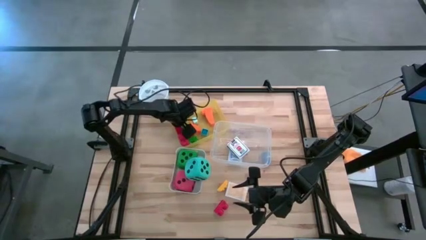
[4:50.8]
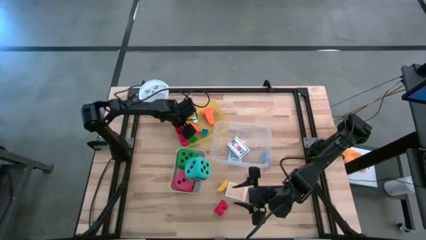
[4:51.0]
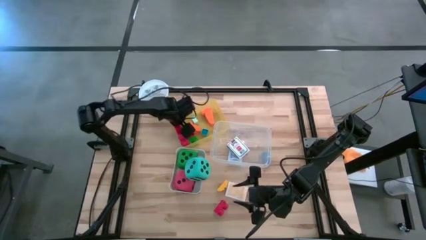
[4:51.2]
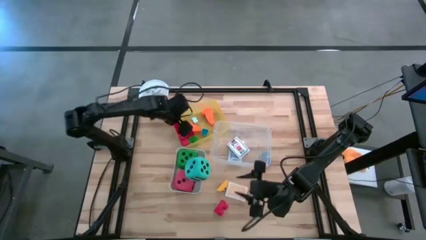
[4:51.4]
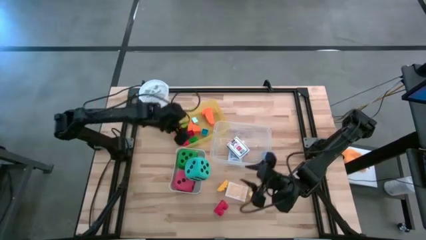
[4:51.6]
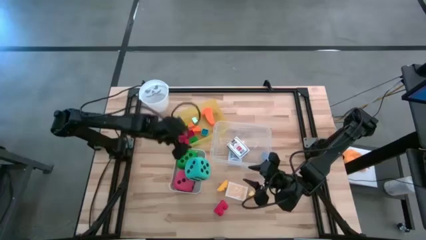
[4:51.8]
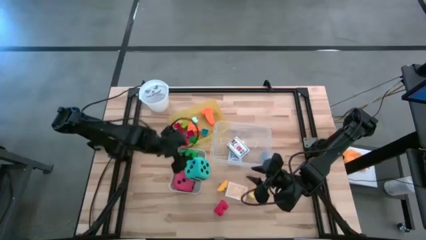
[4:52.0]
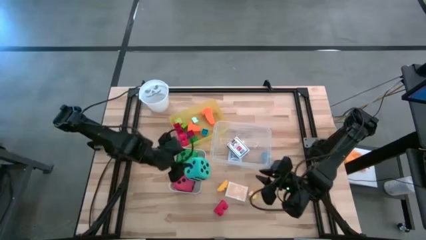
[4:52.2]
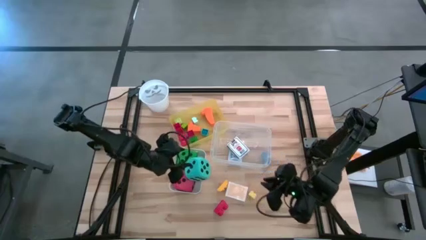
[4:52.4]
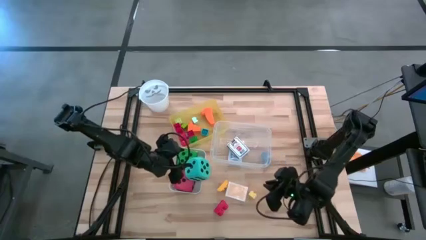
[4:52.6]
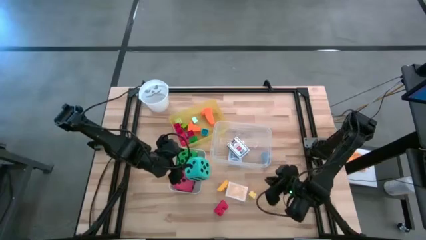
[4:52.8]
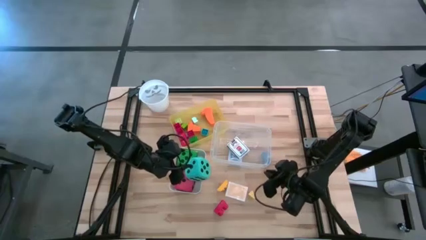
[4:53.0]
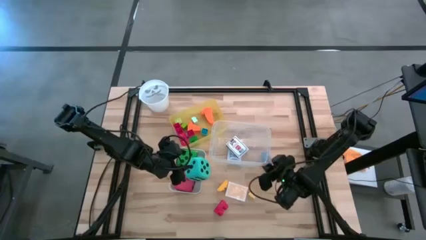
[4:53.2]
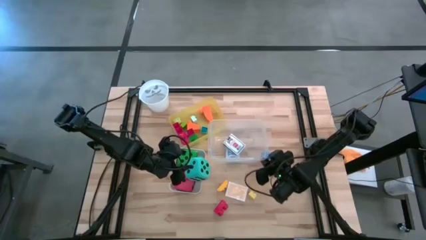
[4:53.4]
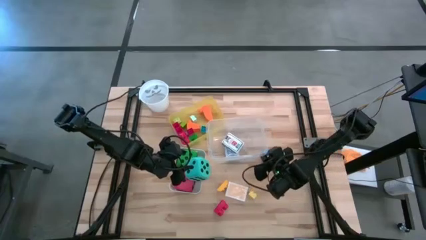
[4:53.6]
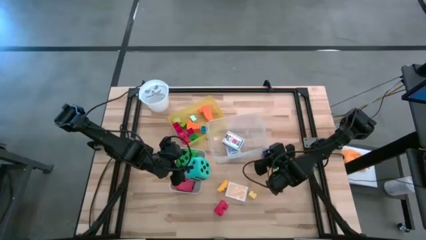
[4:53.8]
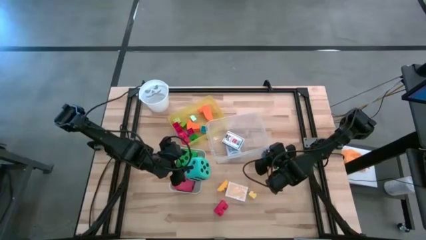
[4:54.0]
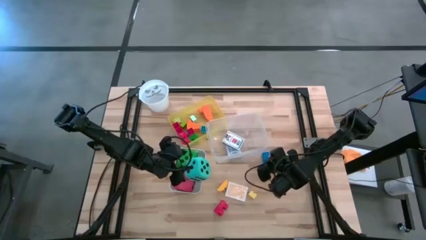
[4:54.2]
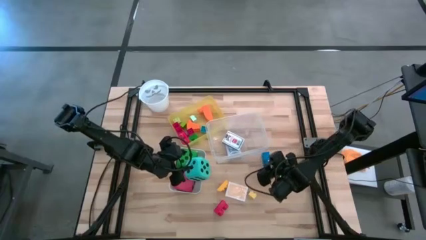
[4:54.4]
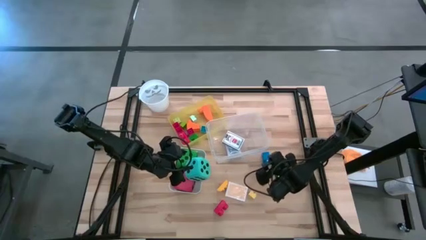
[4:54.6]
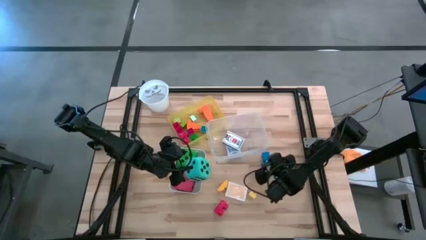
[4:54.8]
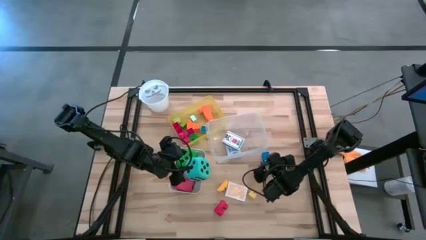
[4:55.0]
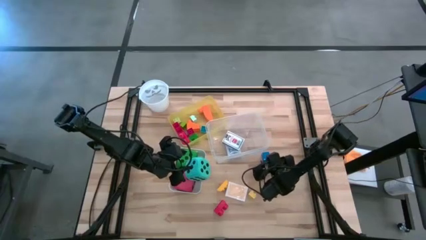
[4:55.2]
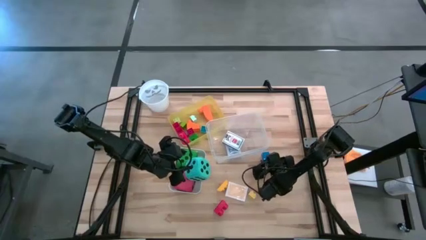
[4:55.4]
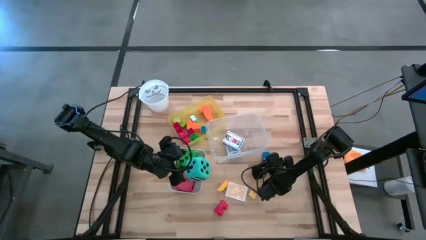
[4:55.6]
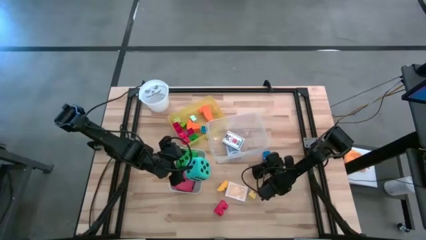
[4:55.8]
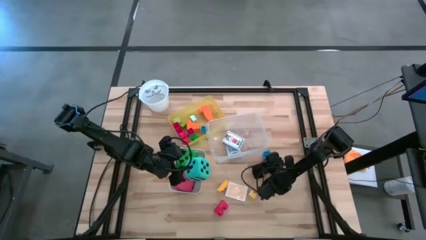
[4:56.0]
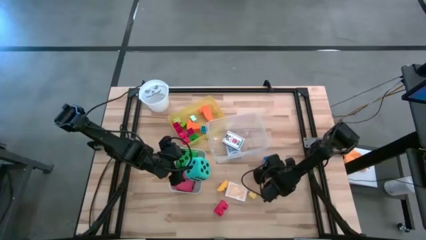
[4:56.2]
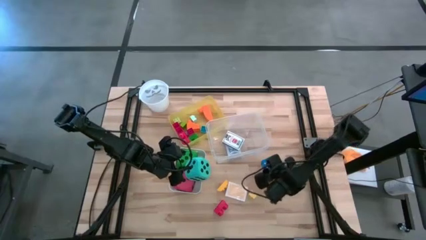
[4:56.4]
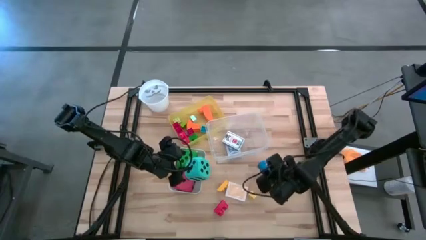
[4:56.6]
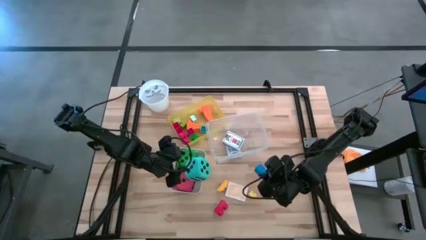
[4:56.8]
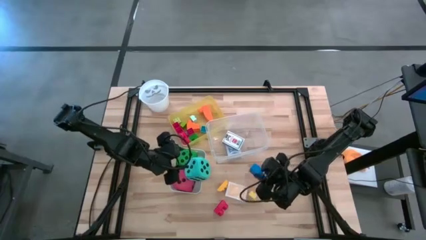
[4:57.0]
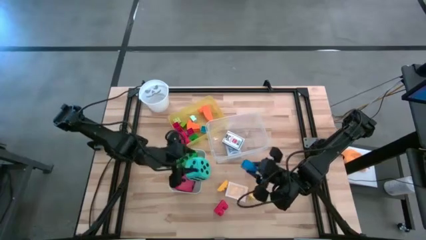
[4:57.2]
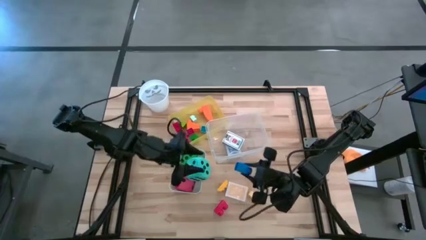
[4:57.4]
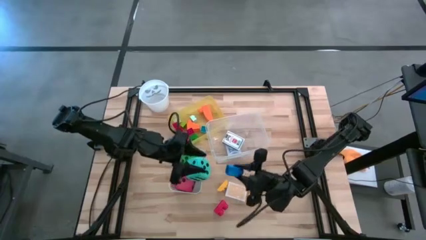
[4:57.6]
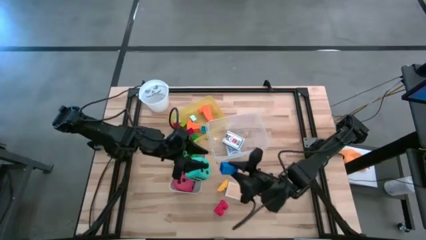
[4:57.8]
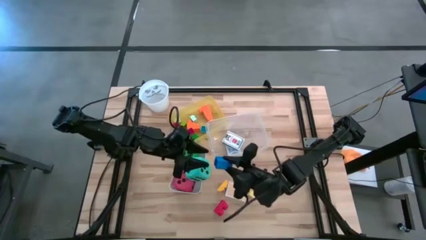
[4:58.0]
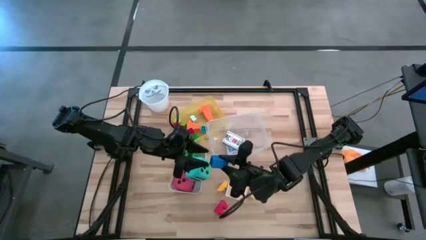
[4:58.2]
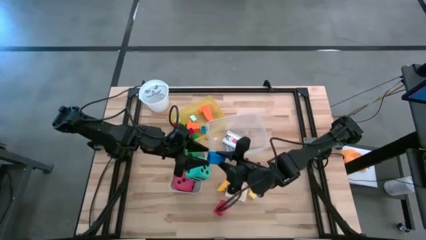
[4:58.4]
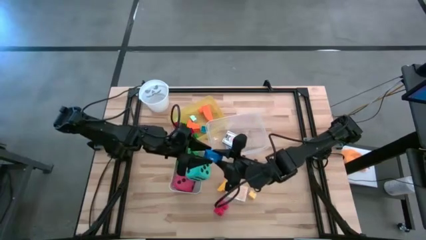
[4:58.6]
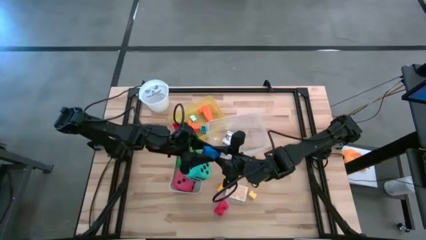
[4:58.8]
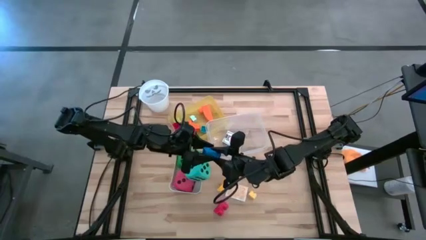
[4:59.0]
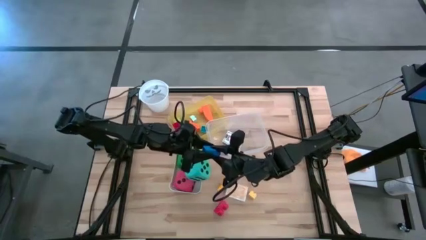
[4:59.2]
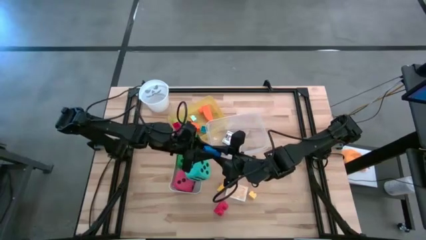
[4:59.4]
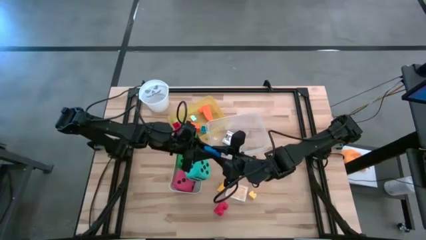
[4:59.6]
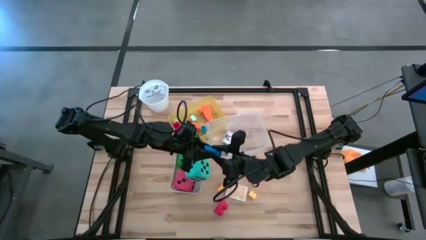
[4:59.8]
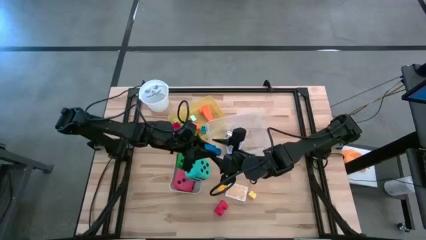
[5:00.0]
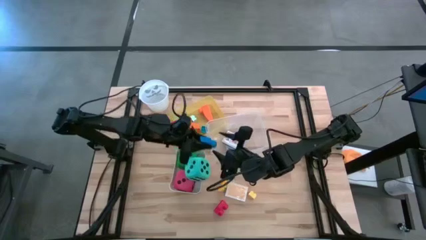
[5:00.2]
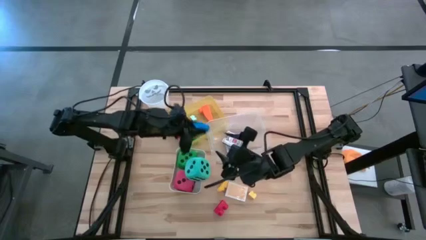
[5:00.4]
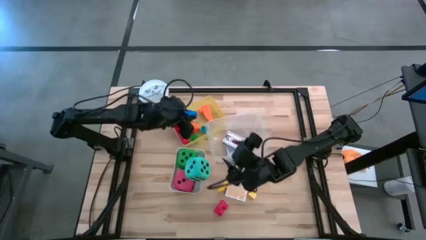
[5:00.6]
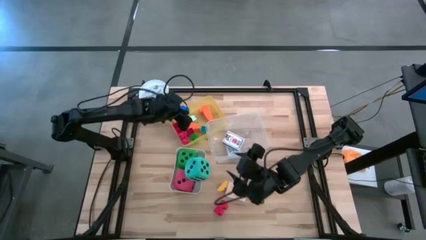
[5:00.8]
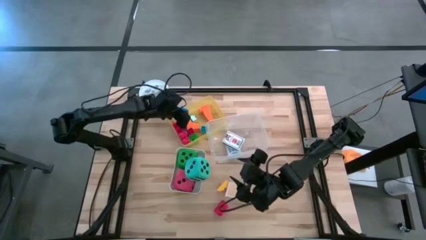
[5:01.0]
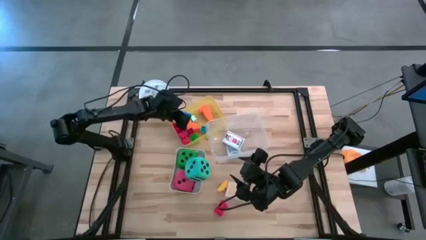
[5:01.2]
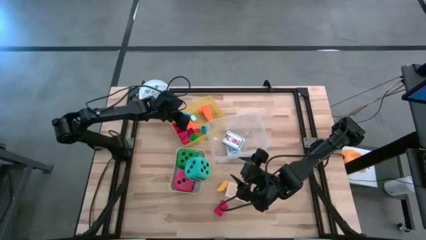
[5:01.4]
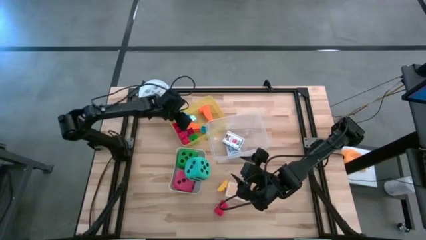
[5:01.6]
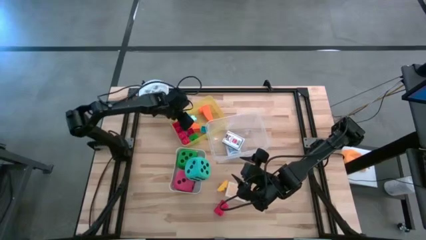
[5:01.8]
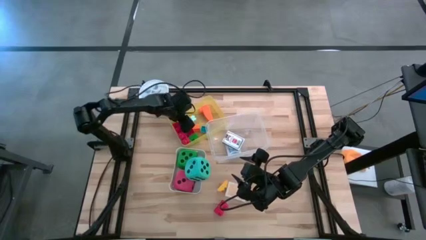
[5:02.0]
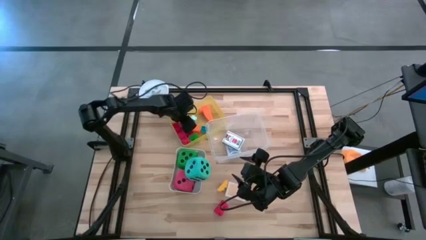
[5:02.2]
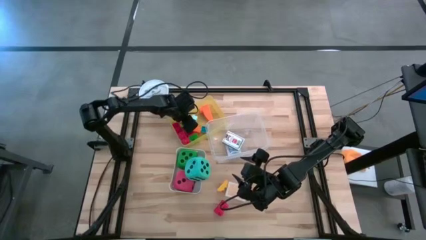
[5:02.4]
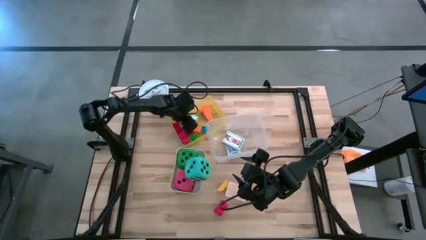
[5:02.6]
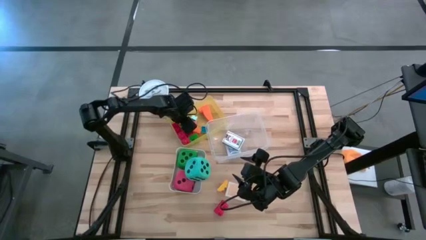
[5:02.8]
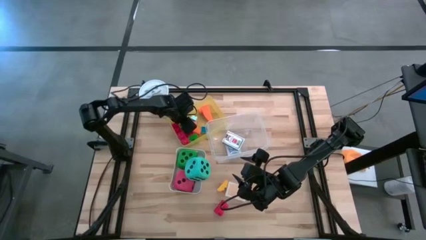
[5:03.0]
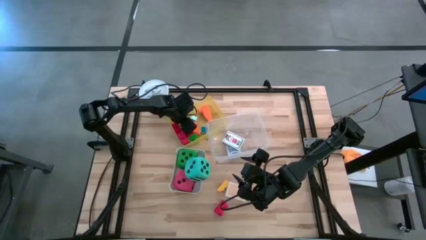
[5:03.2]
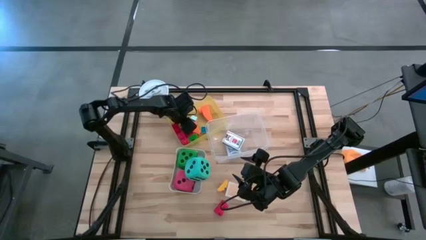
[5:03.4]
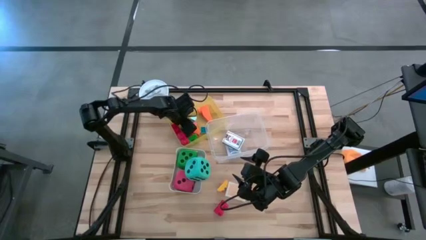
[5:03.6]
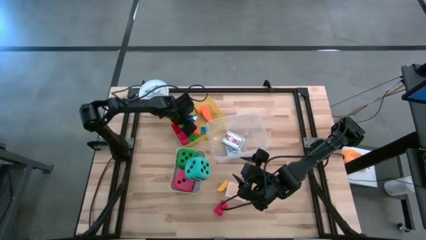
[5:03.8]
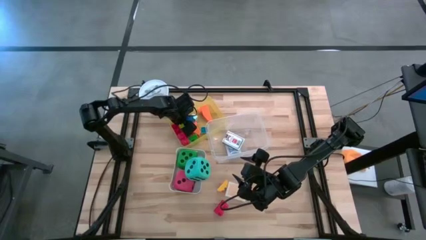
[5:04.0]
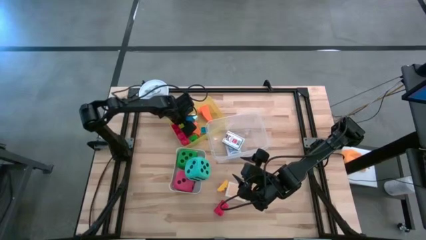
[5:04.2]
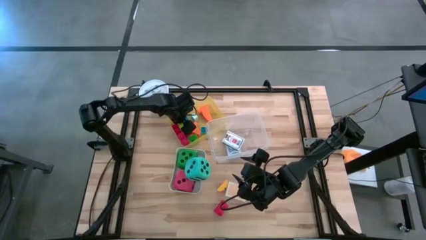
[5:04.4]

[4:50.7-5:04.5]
Task: Pick & Place Toys
Put the dark blue game piece into the yellow bin

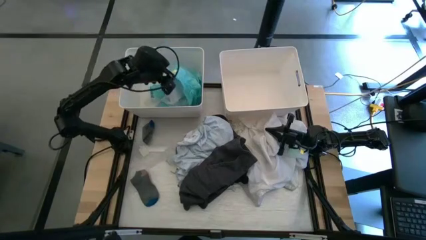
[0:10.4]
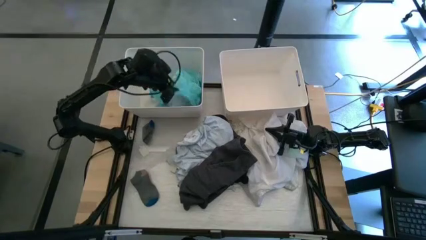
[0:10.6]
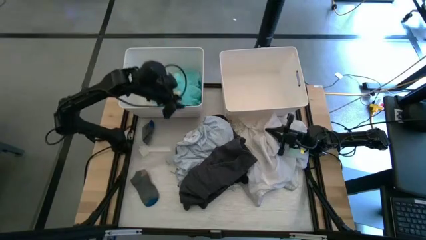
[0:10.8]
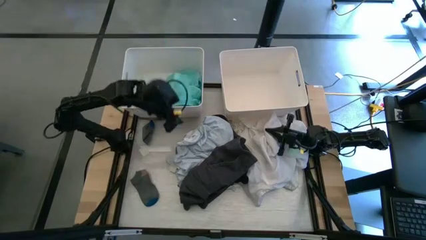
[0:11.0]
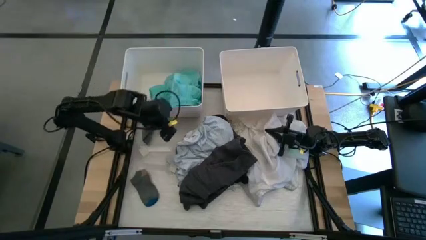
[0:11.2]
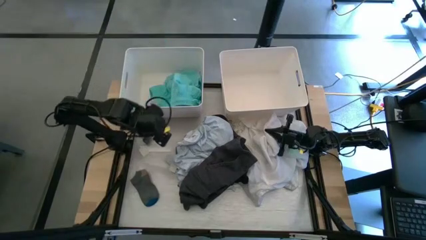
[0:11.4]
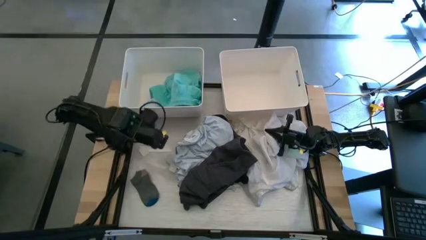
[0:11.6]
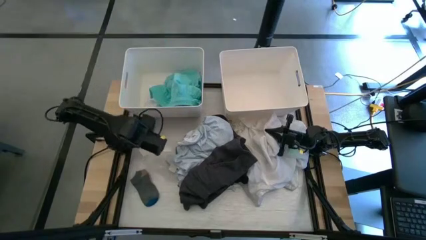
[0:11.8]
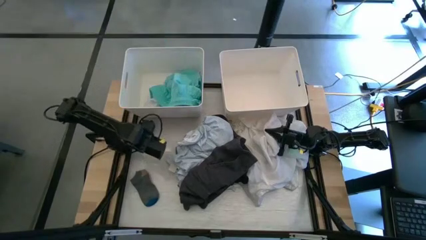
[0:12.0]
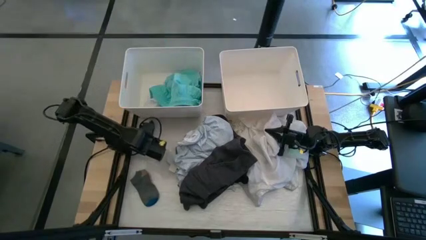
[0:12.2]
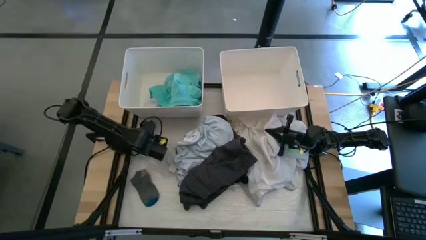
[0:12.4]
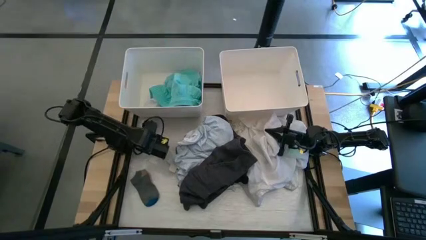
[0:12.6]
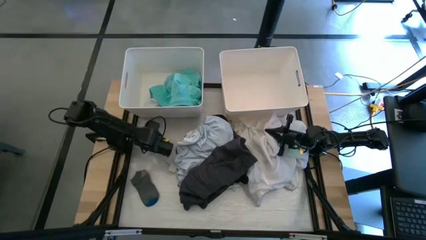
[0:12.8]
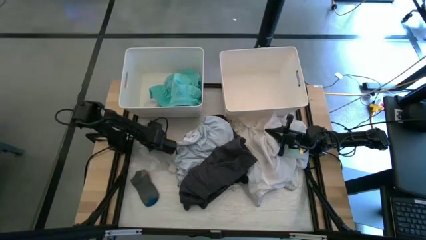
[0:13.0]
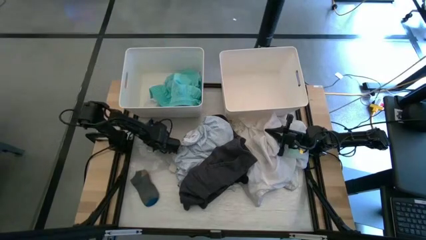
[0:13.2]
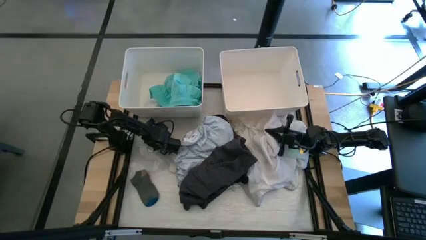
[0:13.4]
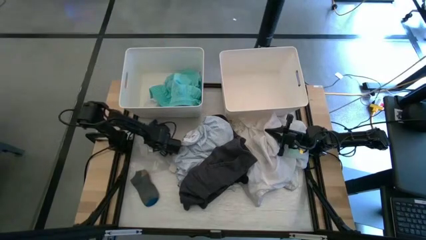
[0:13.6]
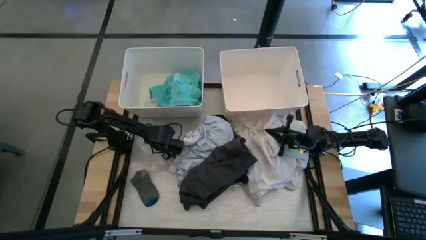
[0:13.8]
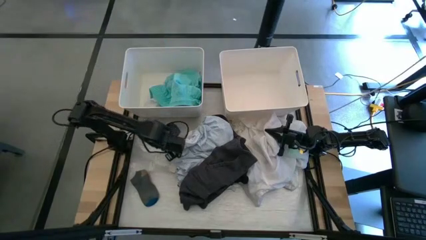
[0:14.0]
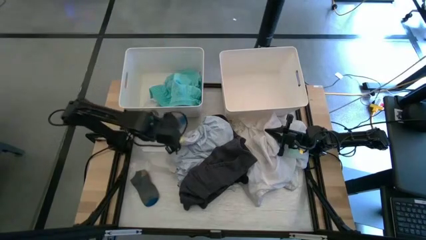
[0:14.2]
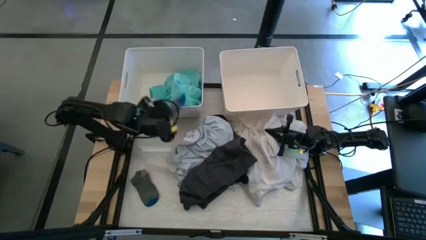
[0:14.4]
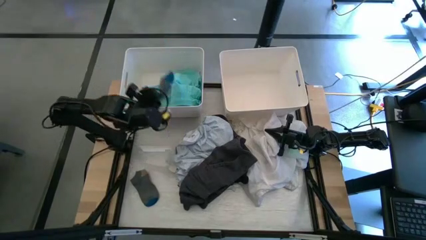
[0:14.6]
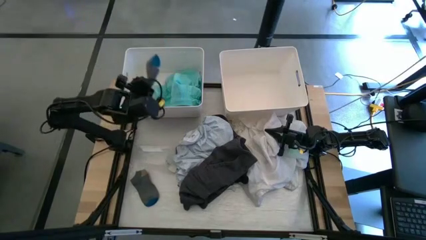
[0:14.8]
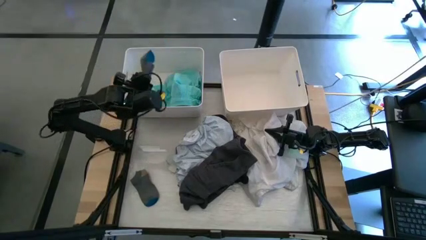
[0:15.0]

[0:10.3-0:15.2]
Task: Sort clothes
Put the gray sock into the left white laundry bin
